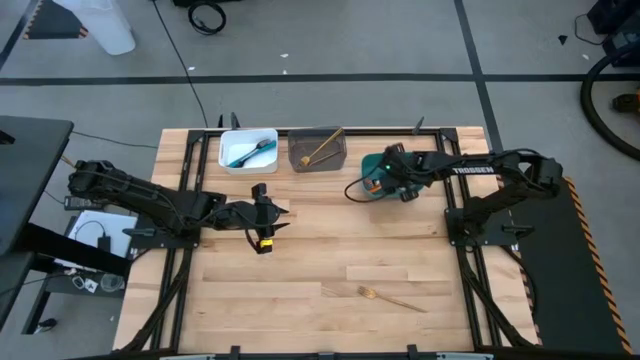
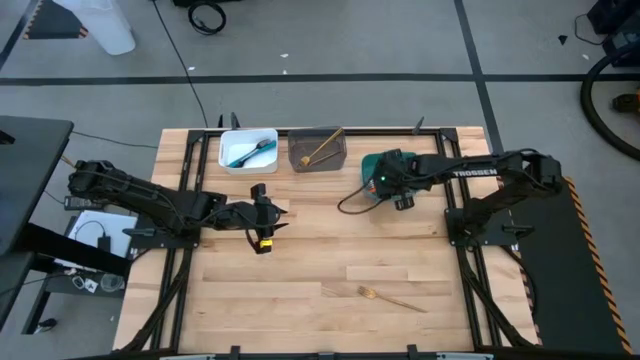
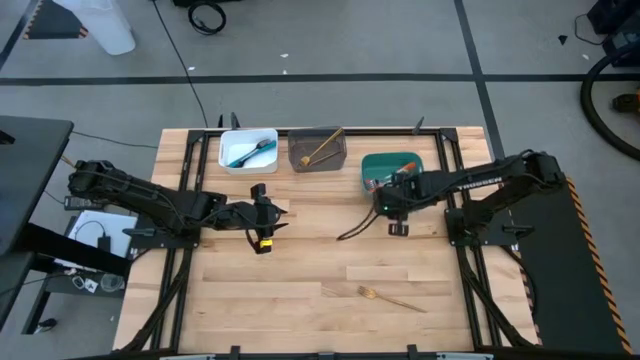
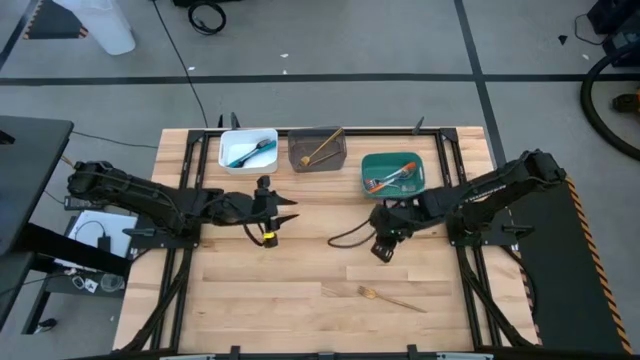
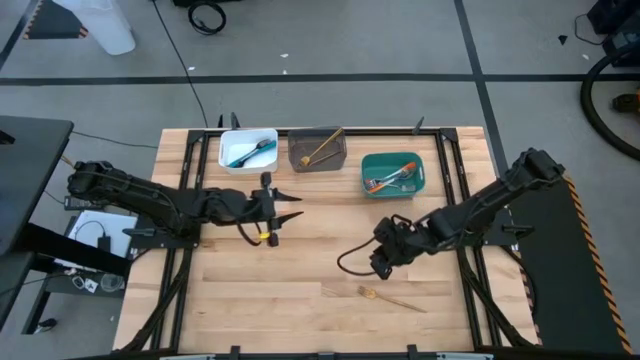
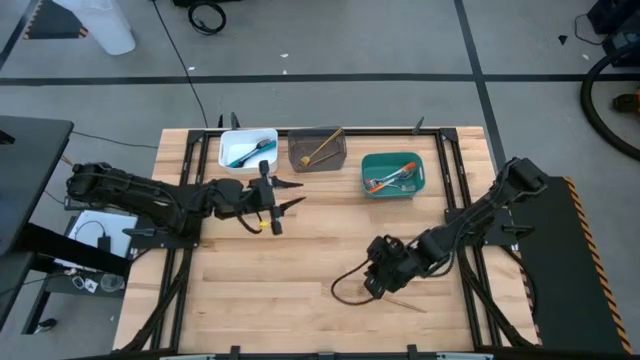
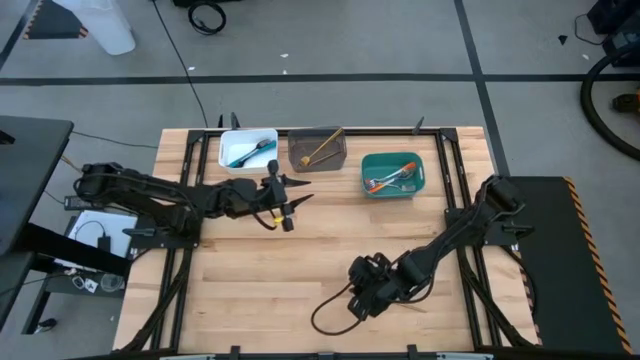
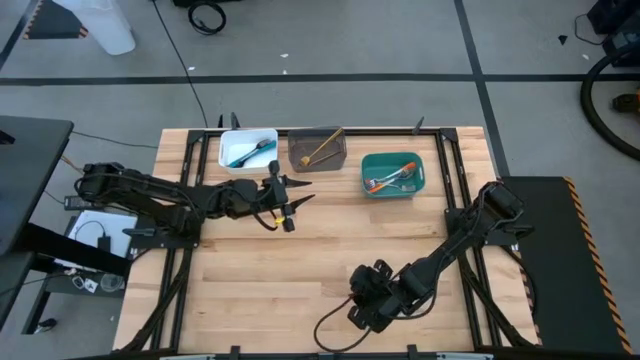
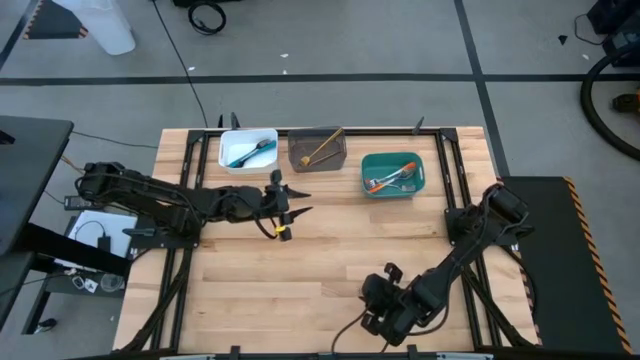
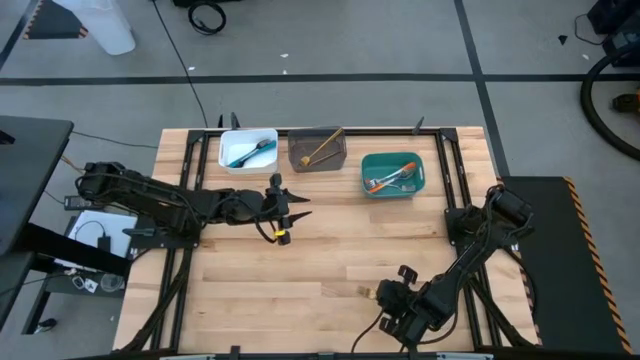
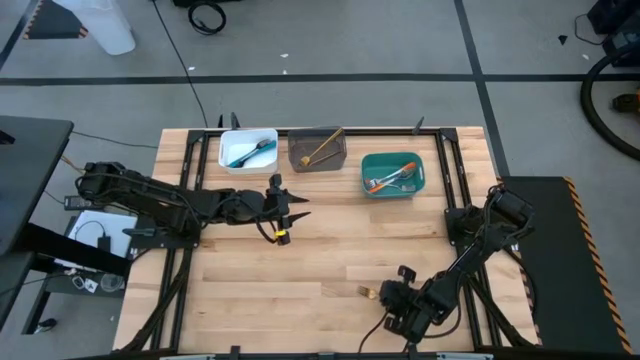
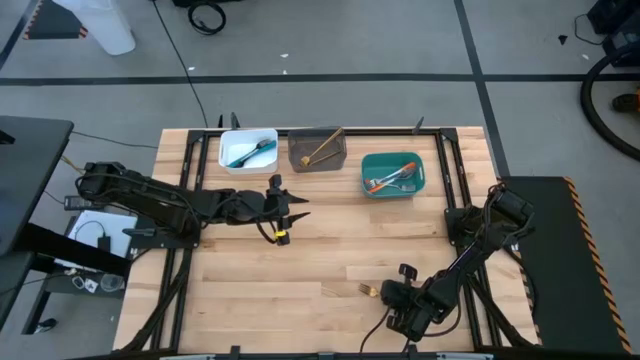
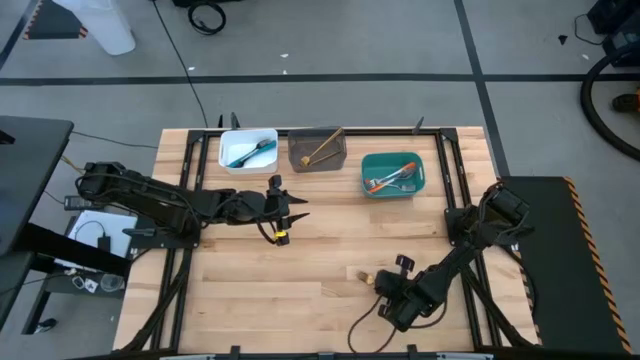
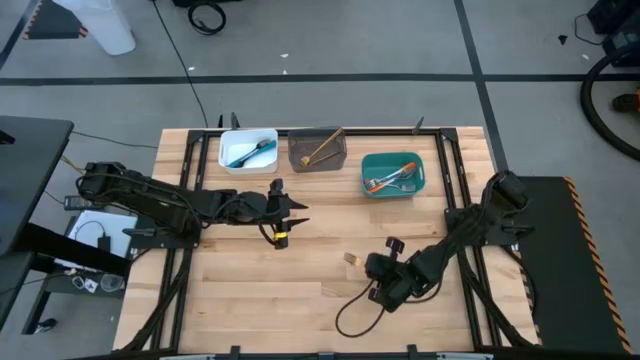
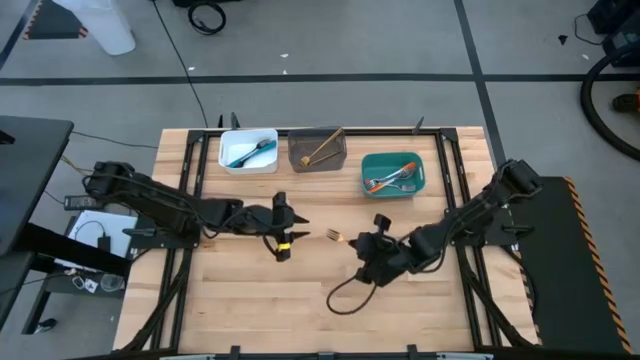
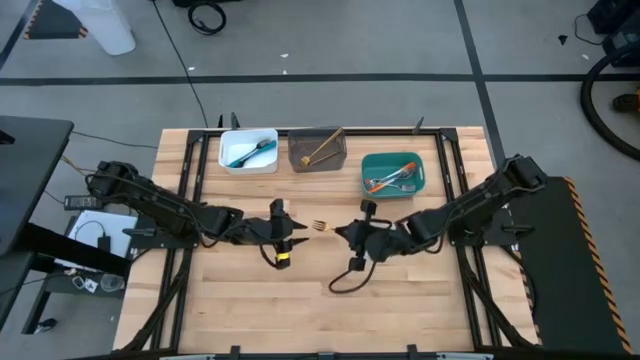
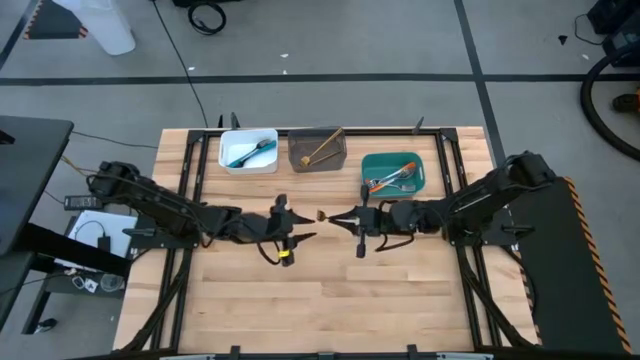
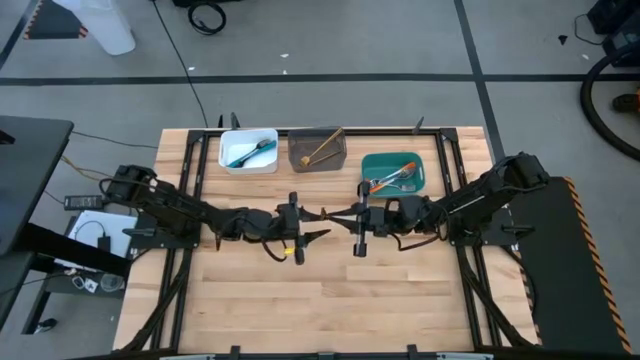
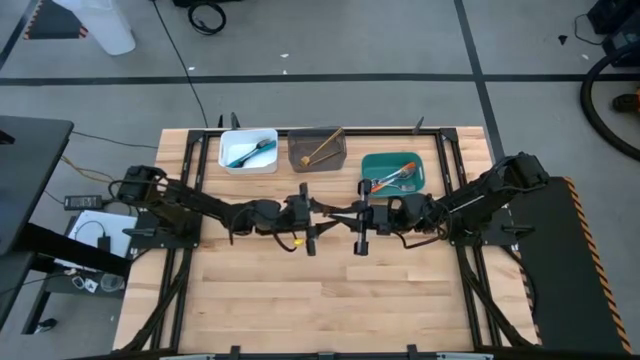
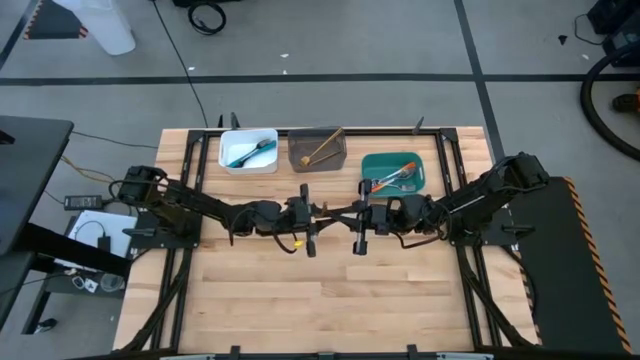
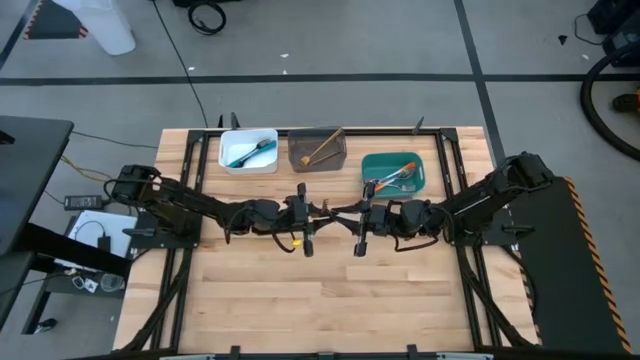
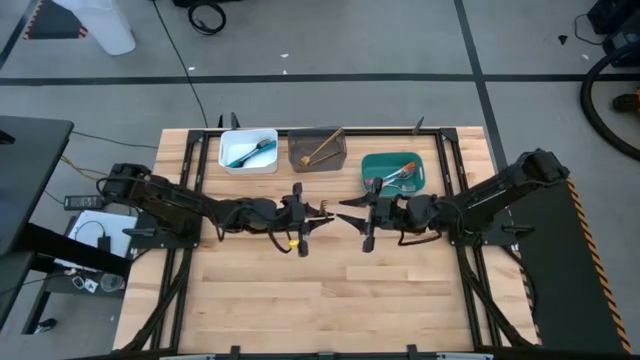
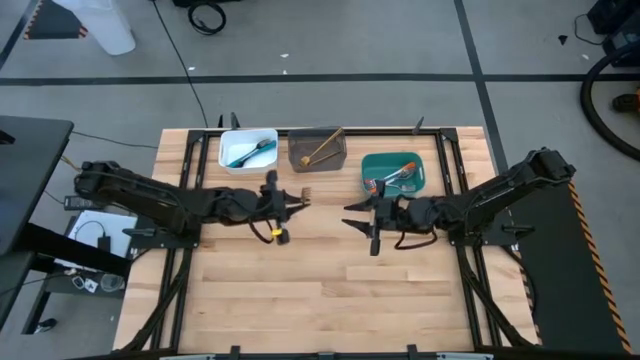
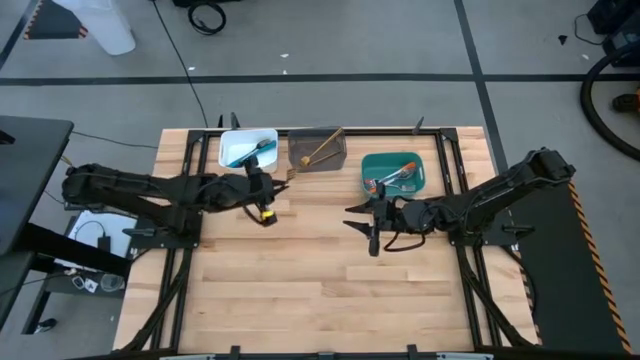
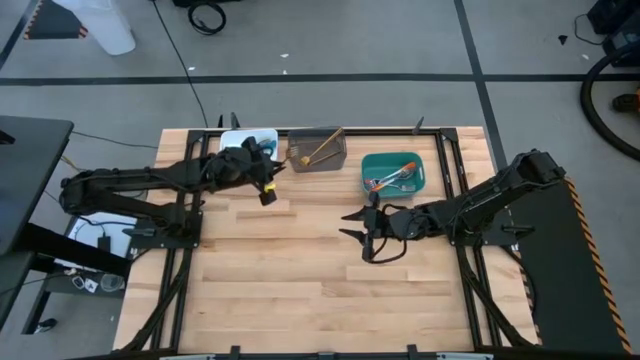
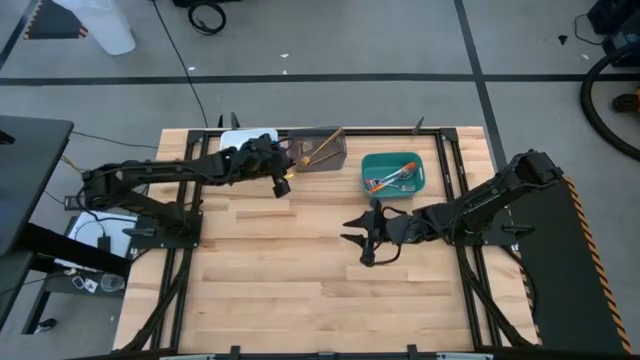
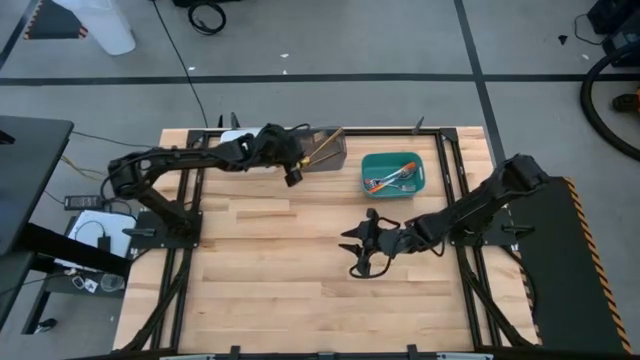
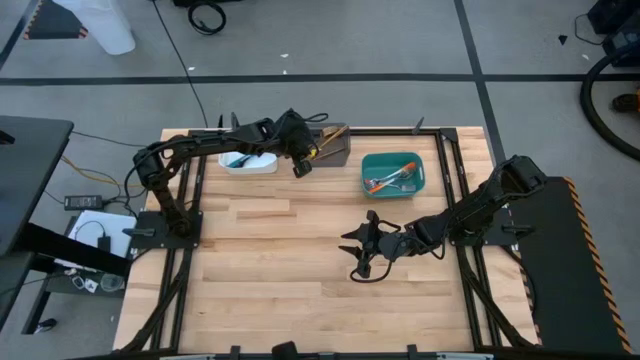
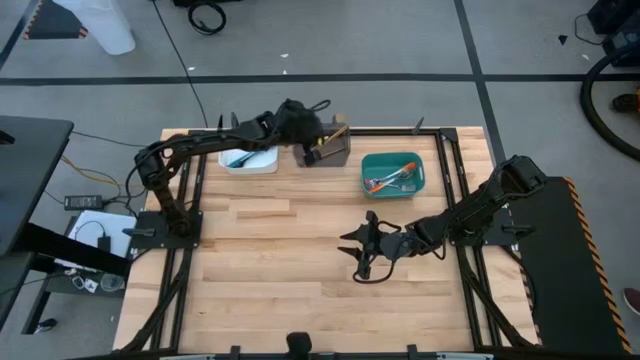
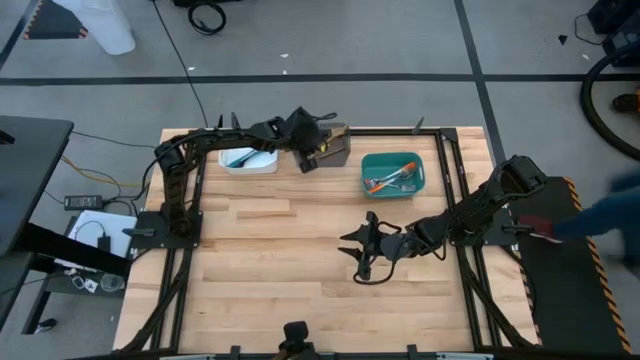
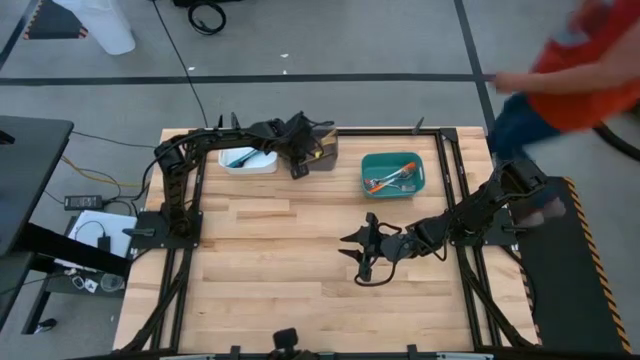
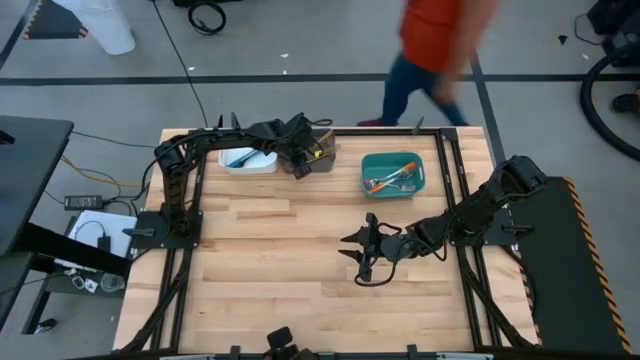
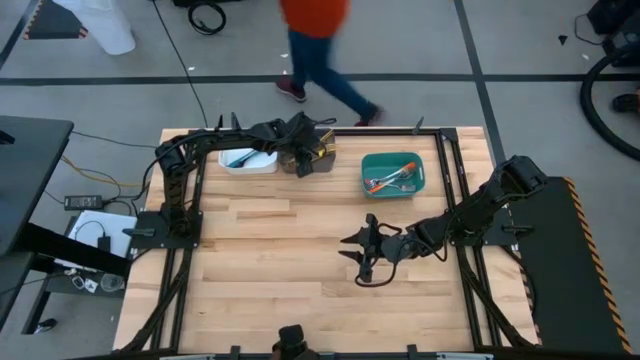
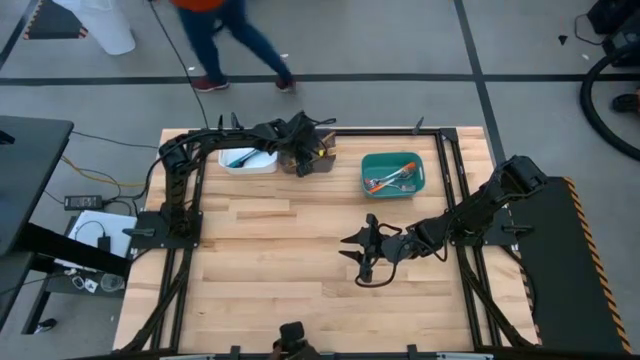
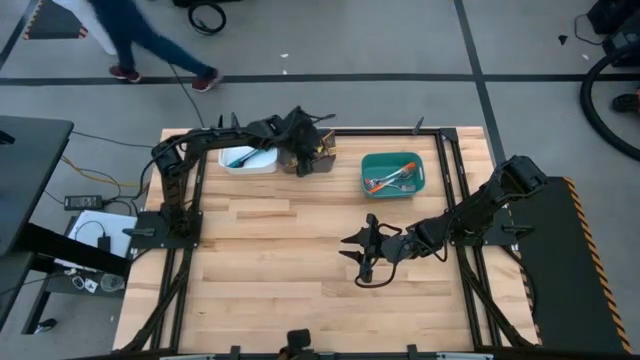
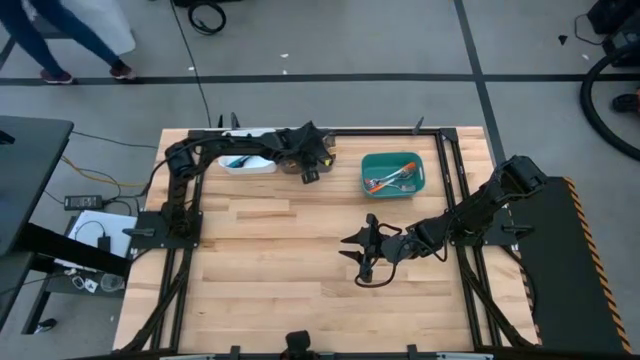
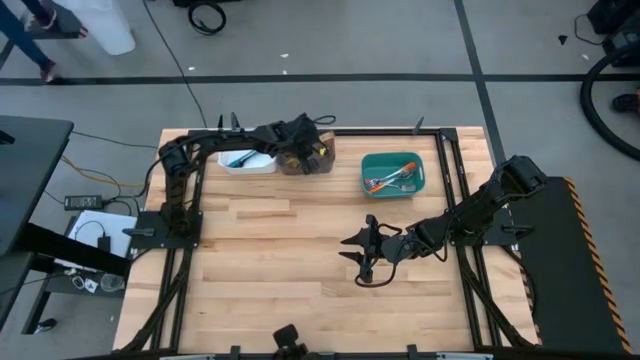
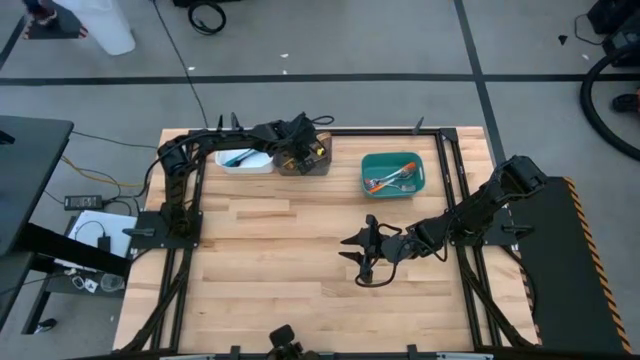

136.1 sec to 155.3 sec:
Task: Sort silverware by color (type)
Put the gold fork into the black bin
